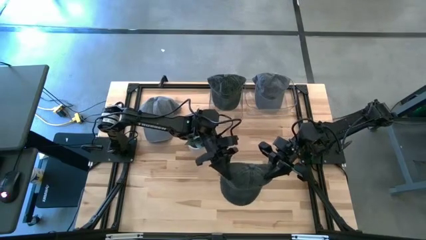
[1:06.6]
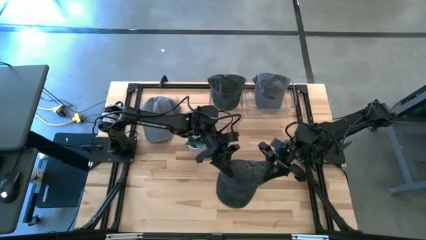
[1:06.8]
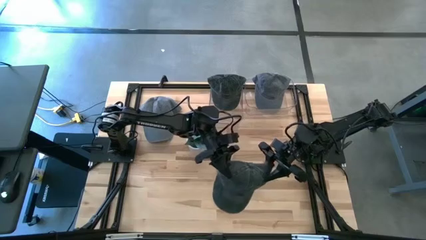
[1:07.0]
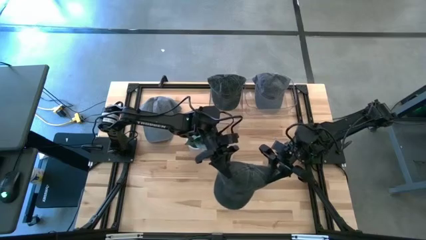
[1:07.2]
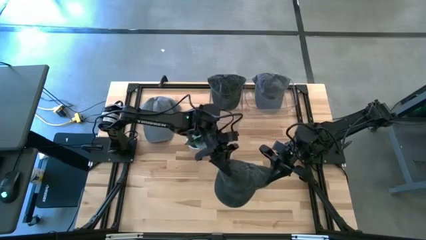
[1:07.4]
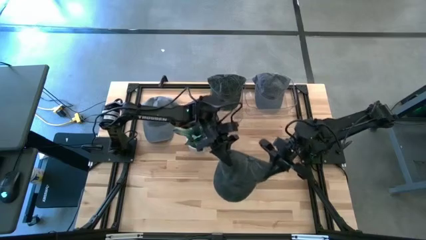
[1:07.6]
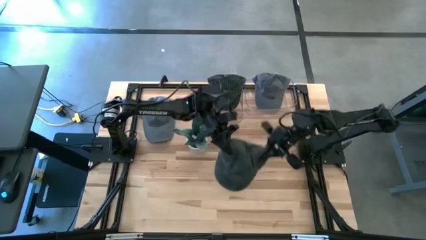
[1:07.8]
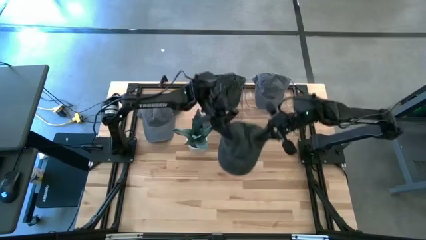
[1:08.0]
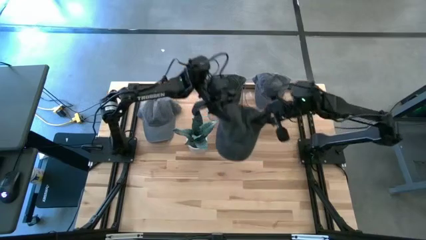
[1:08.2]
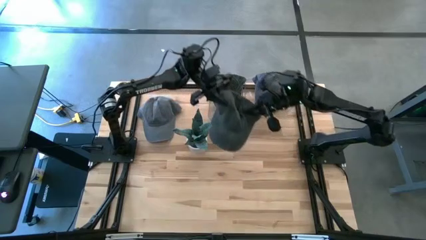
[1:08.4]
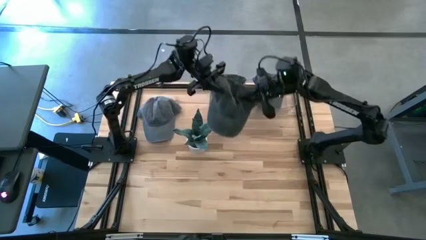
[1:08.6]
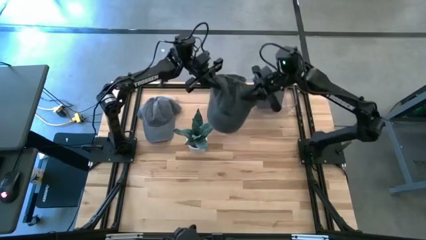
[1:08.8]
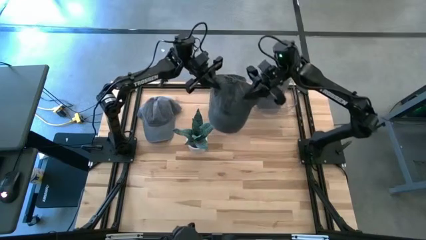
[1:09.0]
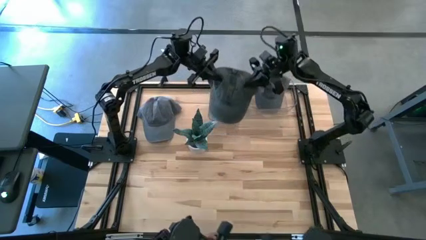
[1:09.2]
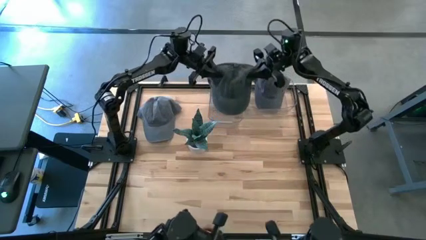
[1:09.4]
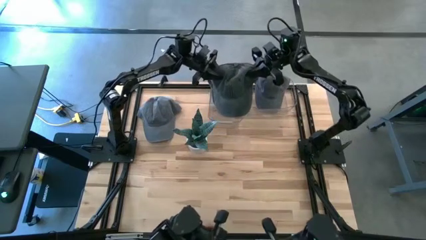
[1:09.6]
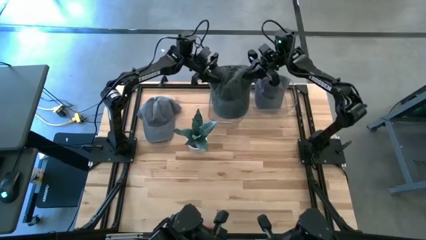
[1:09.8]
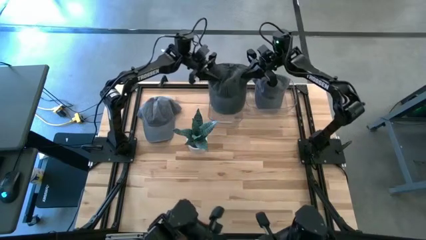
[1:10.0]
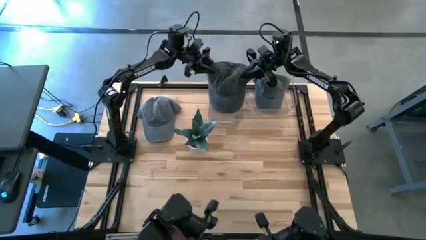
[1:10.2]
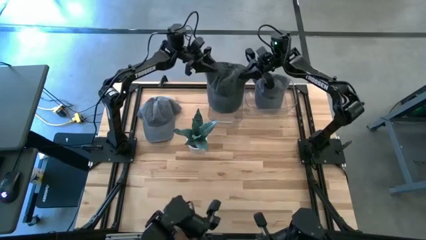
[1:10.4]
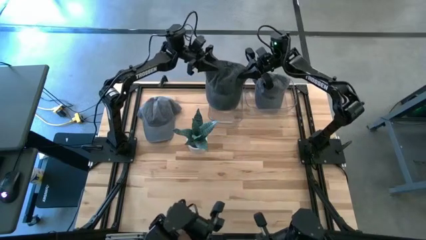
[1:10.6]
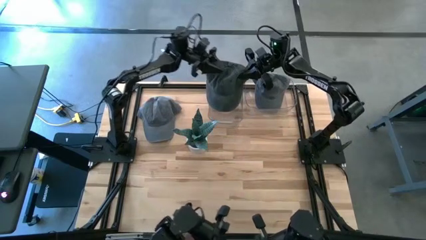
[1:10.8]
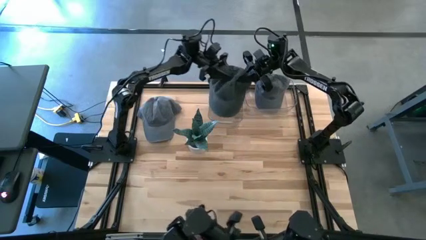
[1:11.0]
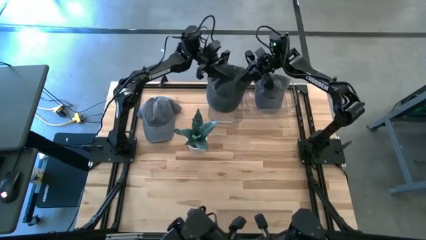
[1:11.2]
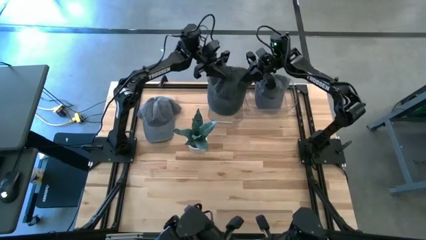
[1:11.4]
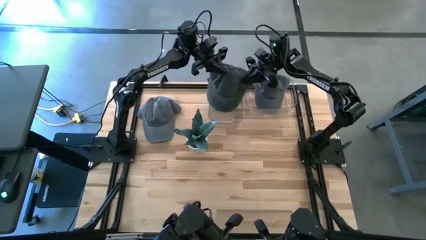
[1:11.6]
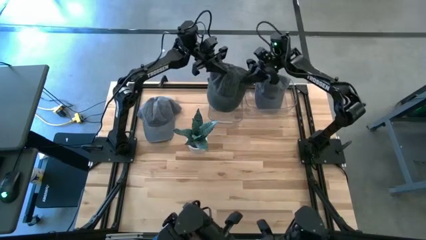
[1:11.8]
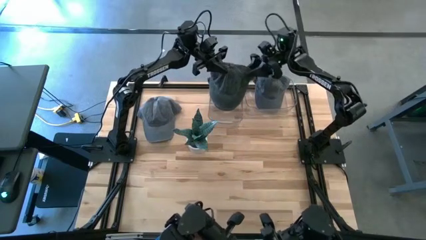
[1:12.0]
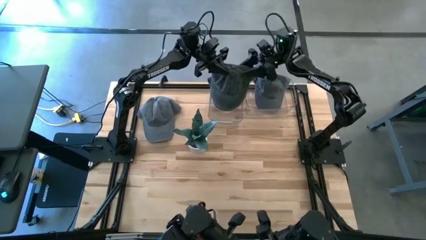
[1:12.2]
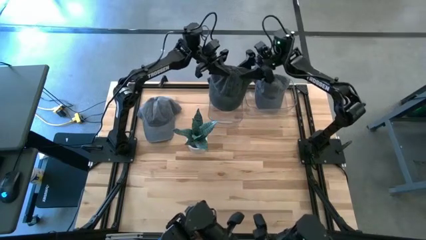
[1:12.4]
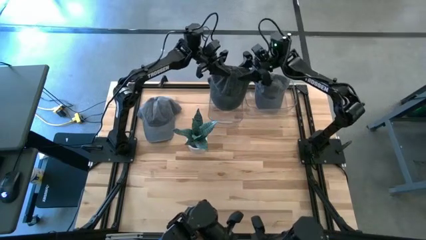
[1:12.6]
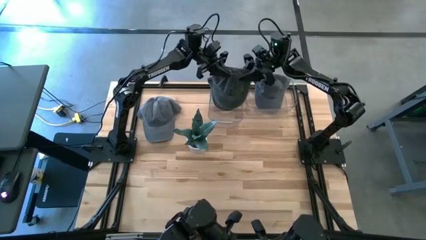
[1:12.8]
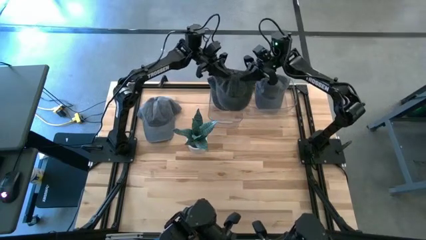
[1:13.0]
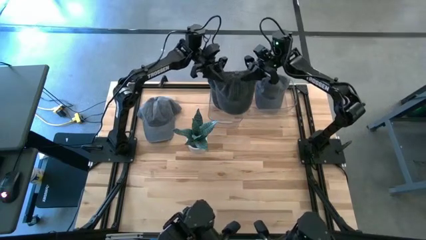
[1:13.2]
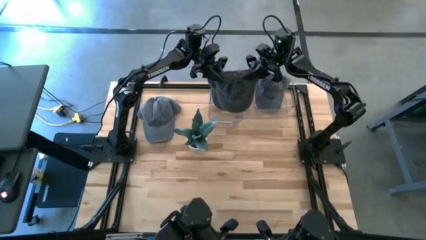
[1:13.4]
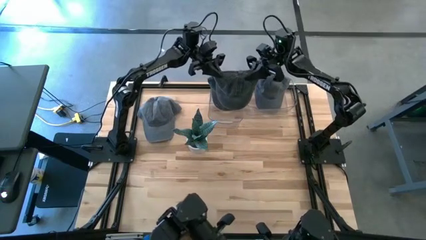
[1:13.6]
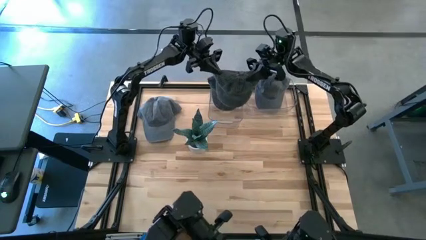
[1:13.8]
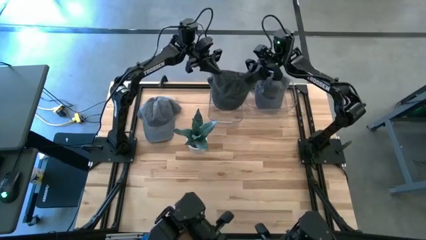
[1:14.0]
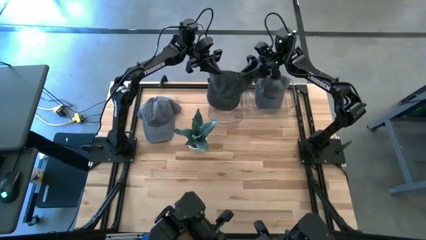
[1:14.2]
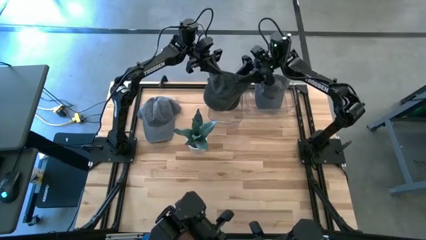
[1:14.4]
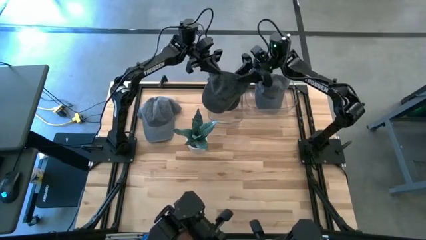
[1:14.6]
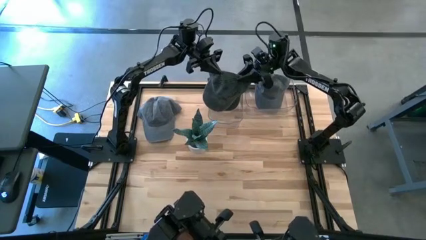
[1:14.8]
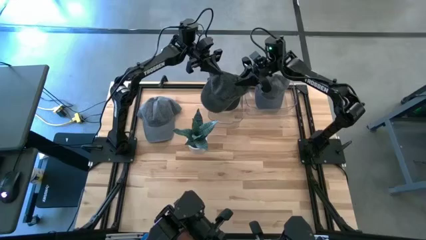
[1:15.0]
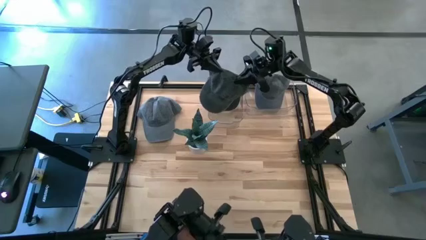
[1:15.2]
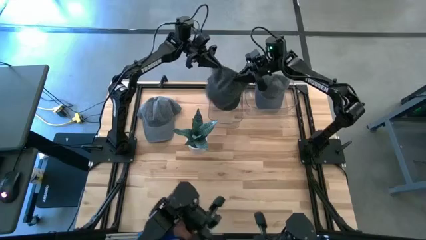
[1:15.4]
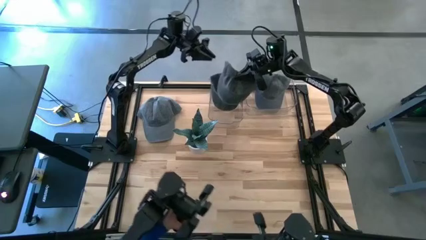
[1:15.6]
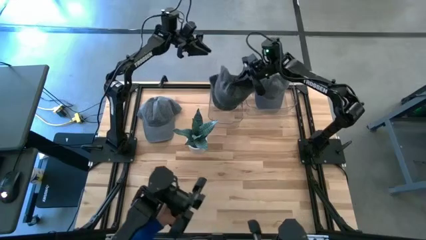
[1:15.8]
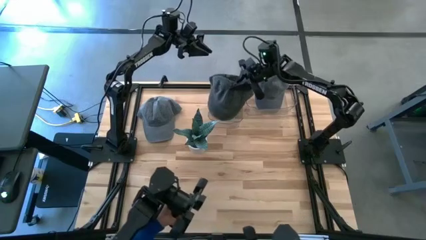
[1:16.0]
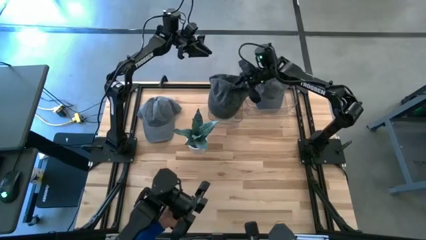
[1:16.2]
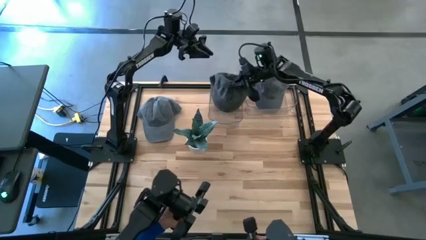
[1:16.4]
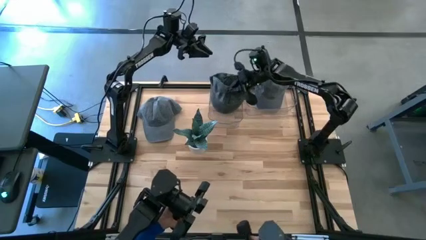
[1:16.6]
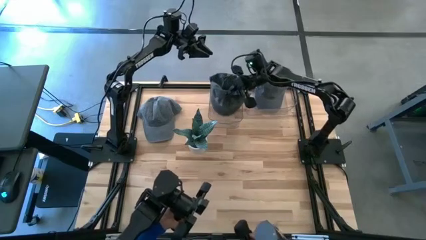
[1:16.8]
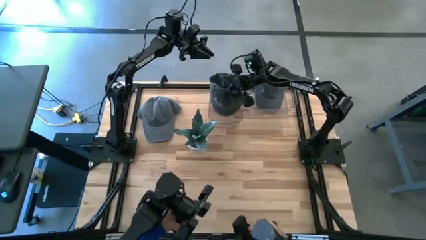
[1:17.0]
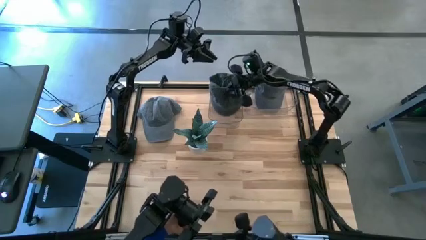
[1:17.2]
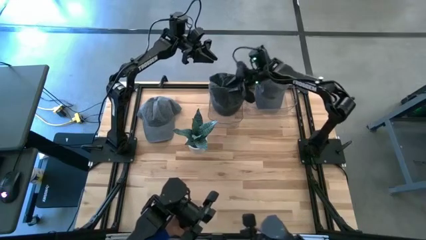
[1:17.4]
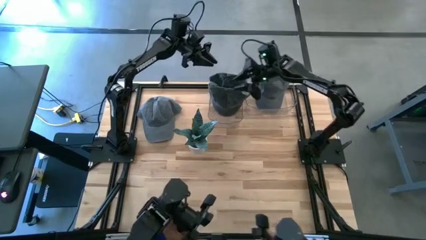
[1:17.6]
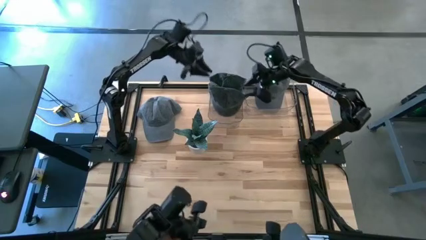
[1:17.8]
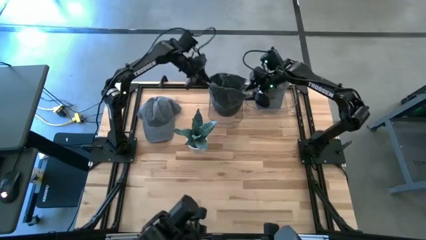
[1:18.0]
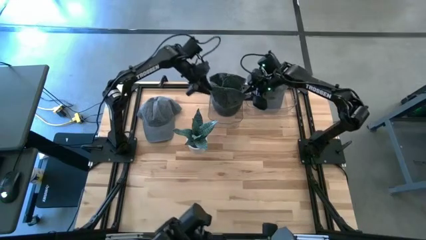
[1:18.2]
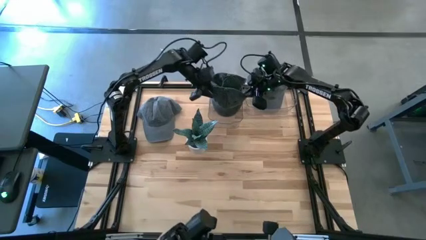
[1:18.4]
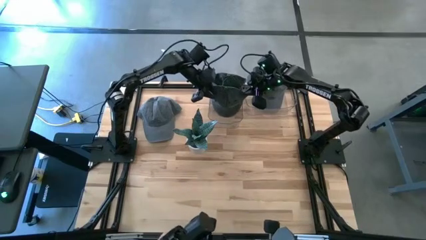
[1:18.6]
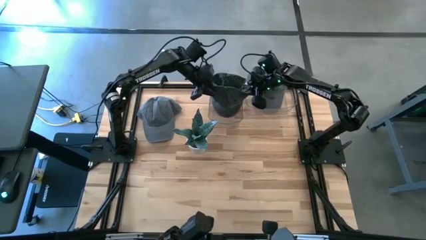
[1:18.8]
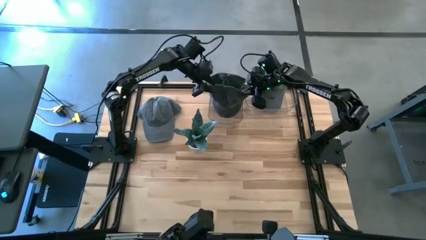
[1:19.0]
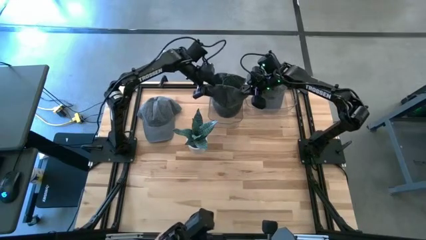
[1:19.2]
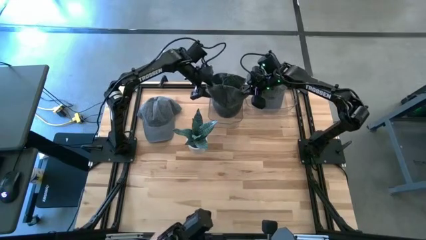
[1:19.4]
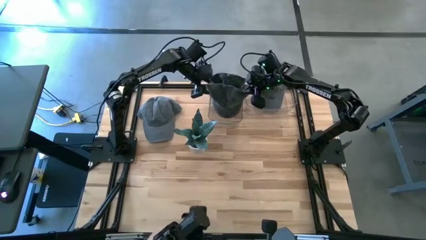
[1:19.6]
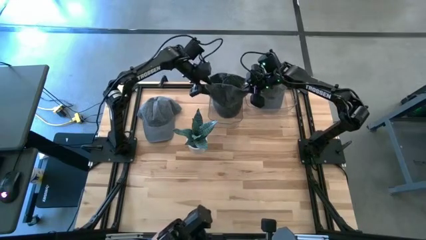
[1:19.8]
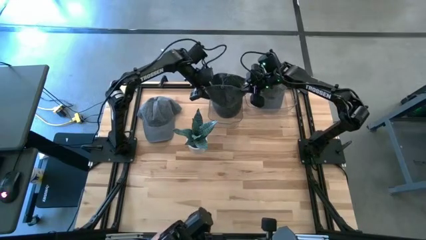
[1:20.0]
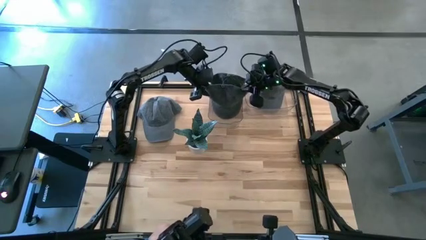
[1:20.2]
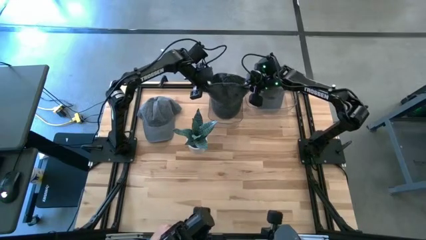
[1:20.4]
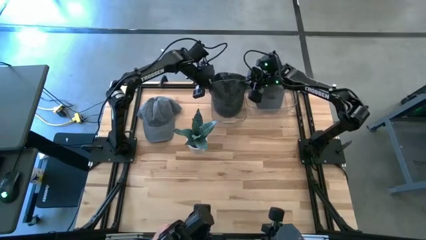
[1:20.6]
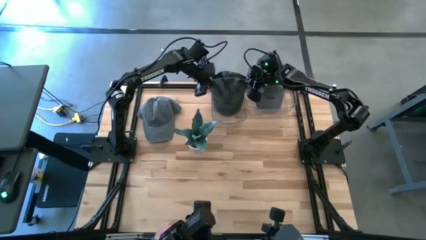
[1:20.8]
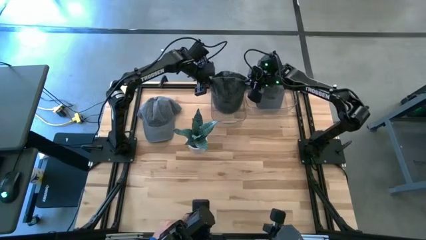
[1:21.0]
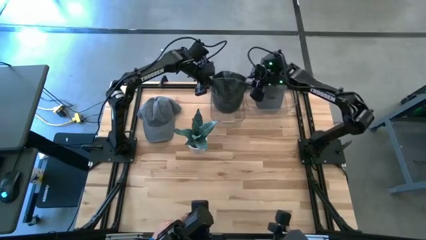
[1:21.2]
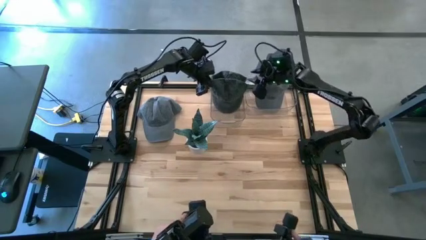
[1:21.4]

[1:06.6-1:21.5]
Task: Pick & Place hat
Put the green cap into the left transparent bin
